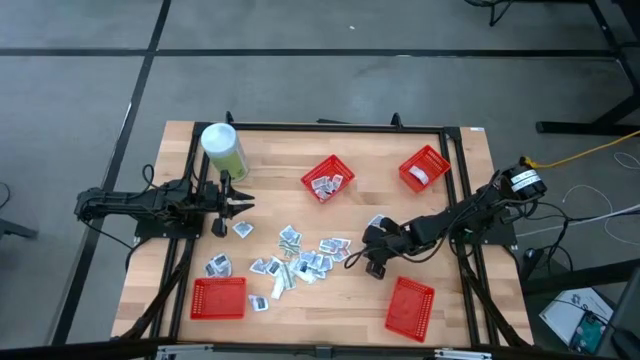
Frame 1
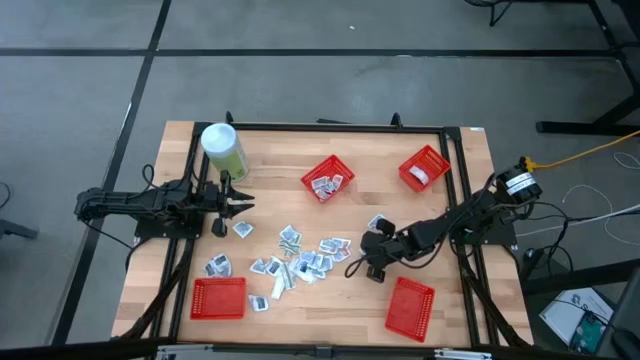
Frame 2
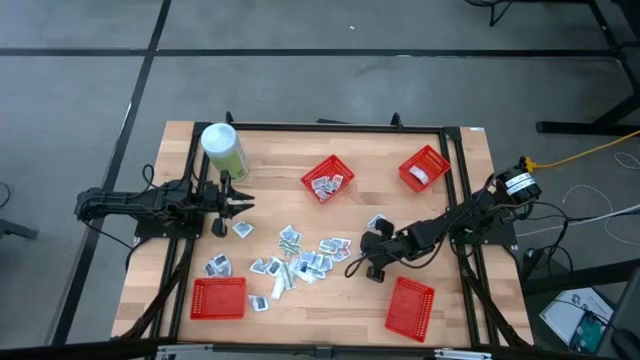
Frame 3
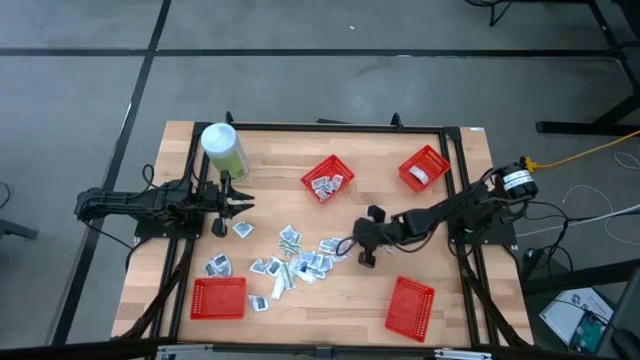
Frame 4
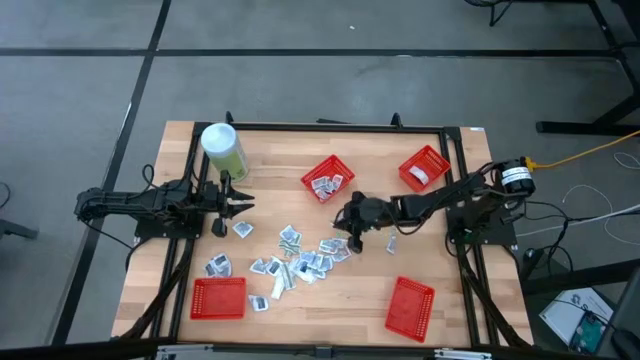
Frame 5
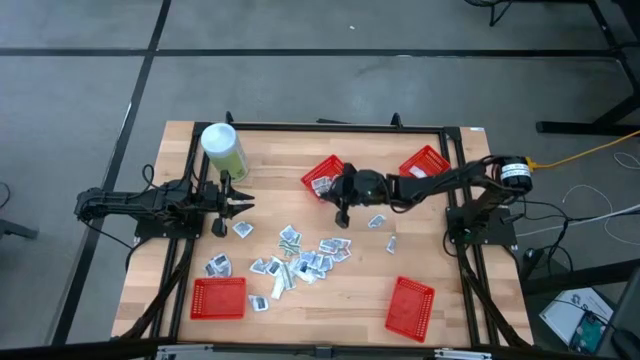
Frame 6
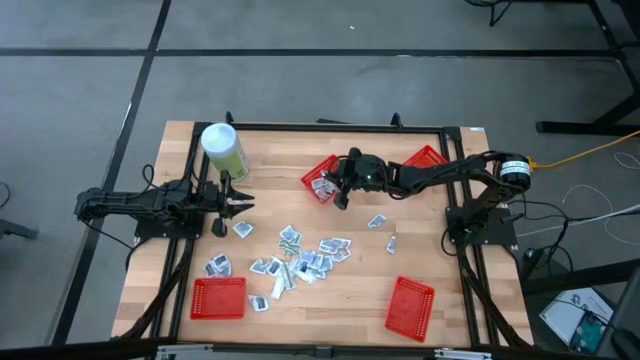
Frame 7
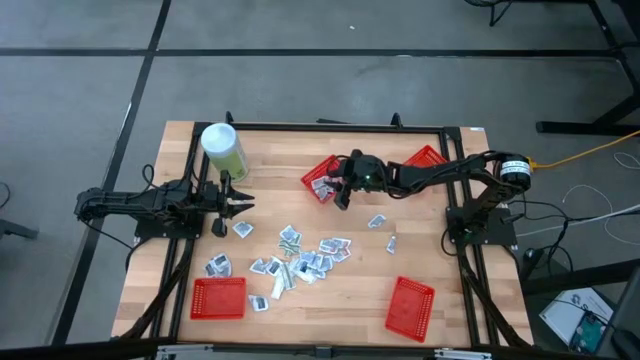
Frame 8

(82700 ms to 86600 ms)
Task: Pick & Place First Aid Supplies
Put the orange ointment pack into the red container

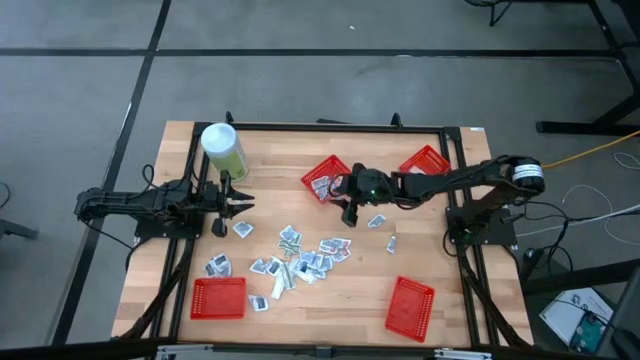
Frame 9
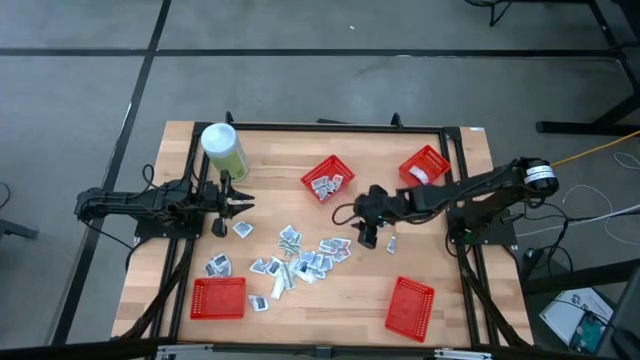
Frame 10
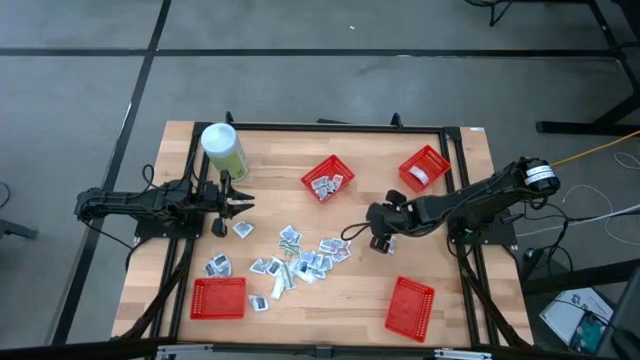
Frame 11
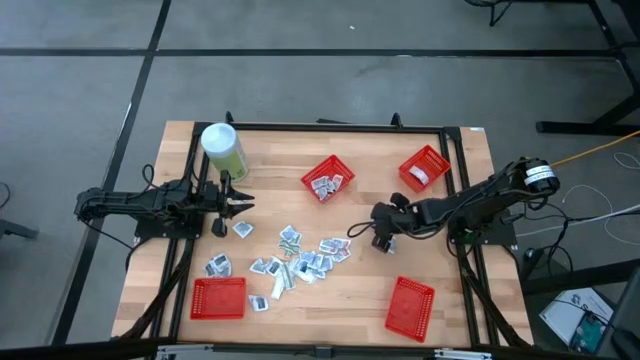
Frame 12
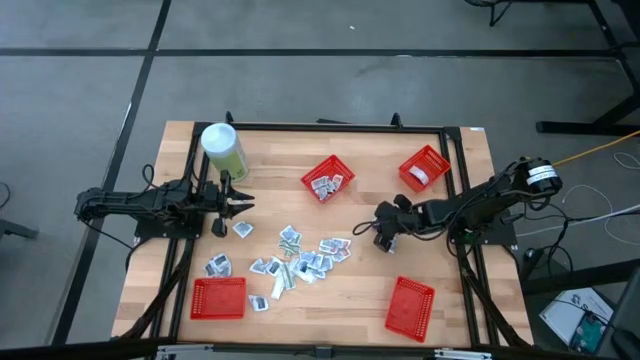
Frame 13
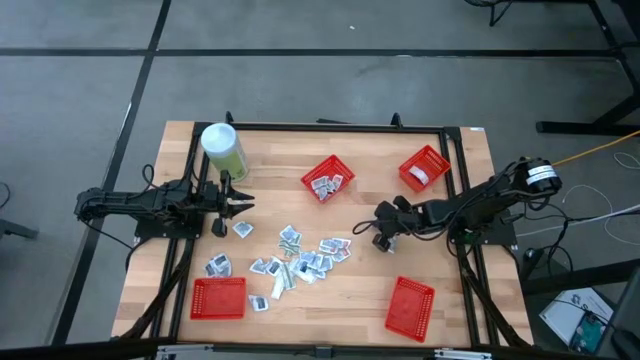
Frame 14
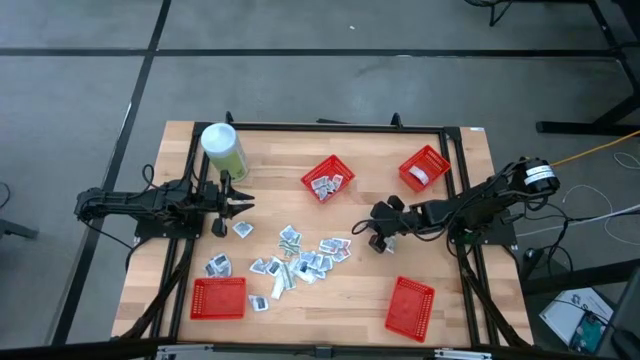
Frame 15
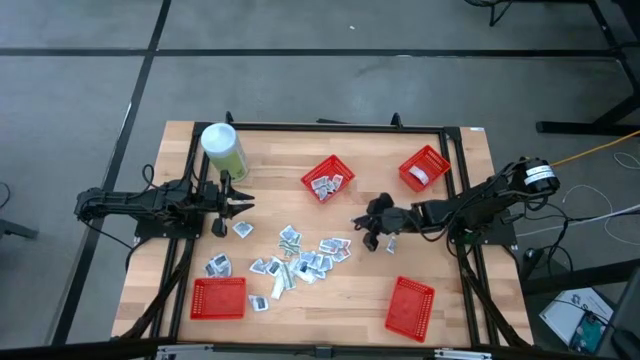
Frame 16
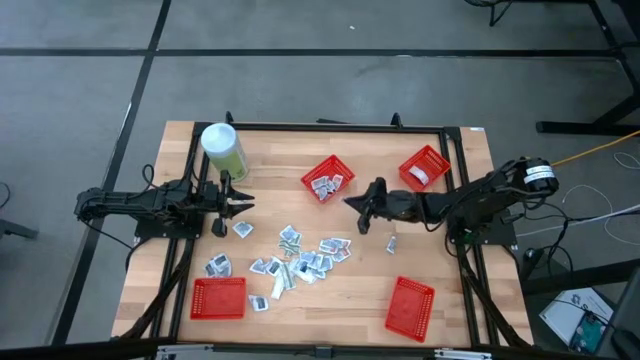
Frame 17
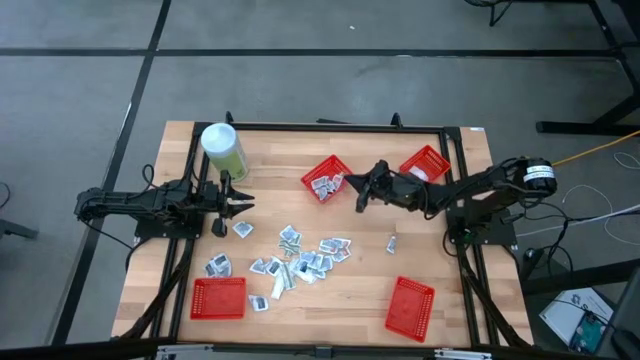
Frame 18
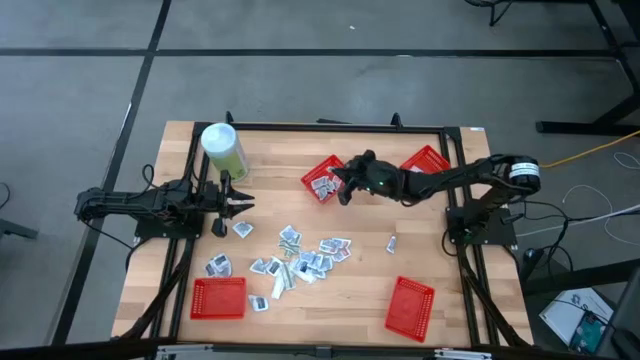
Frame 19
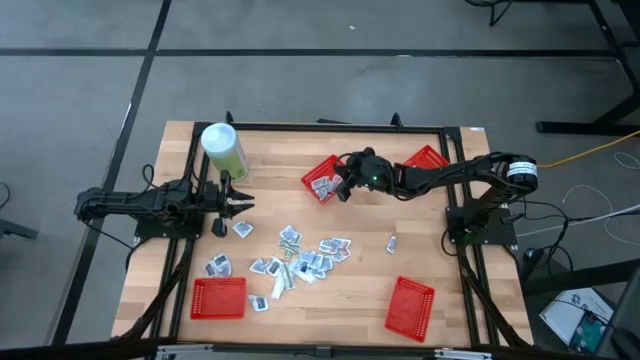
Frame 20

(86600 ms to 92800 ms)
Put the orange ointment pack into the red container

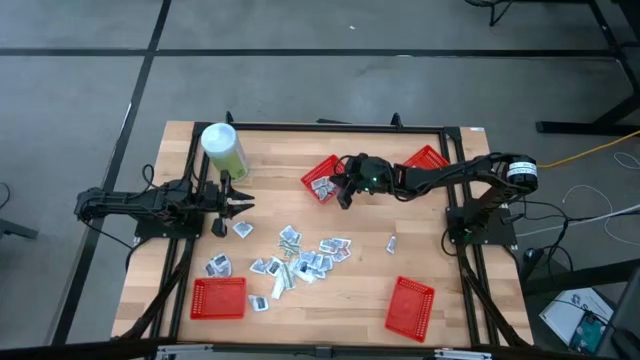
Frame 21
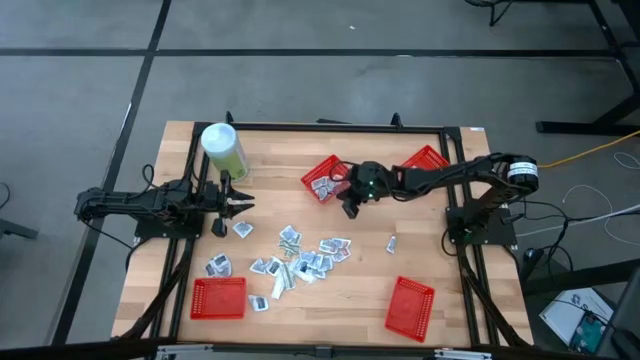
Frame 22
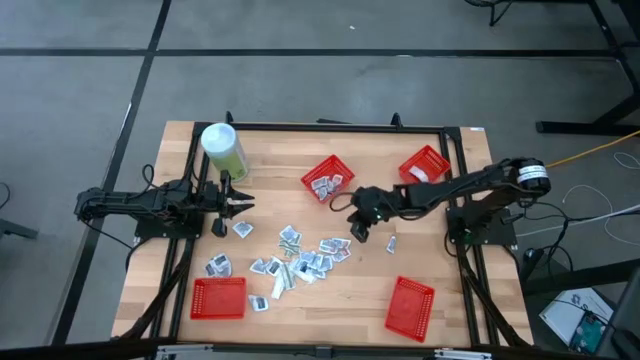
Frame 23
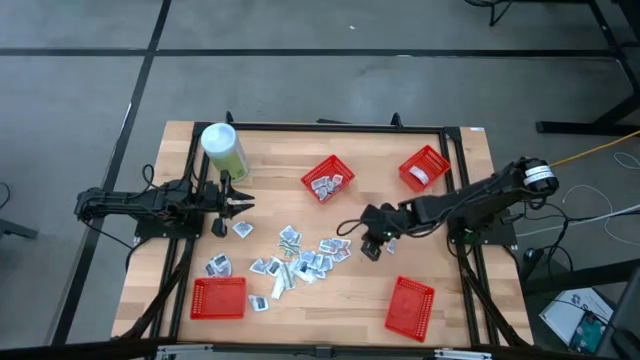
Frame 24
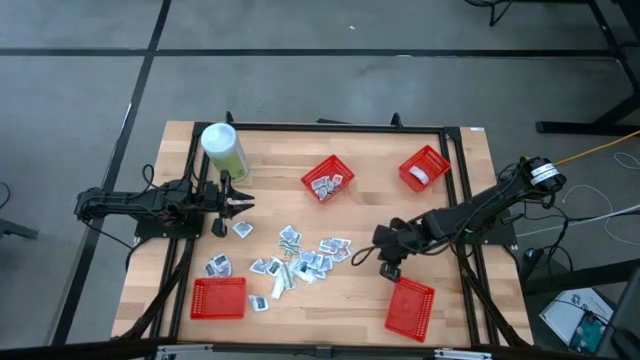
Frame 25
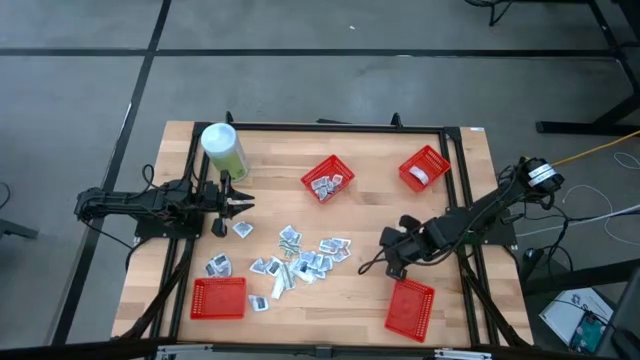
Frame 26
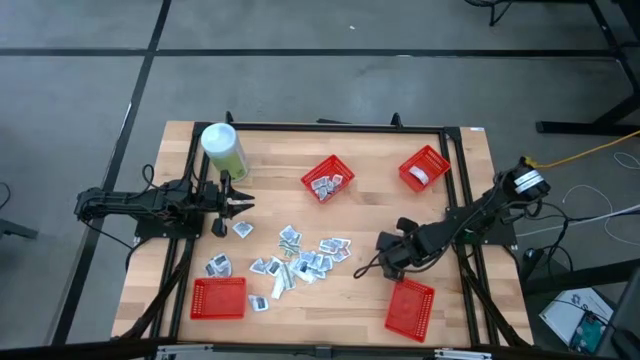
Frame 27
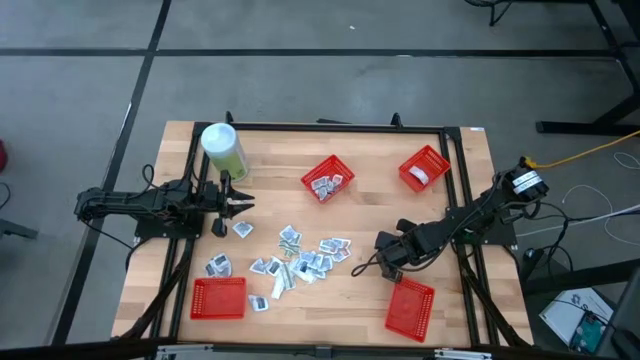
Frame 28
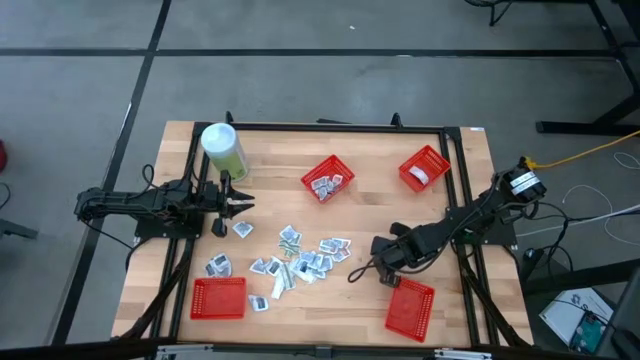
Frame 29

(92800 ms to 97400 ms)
Put the orange ointment pack into the red container

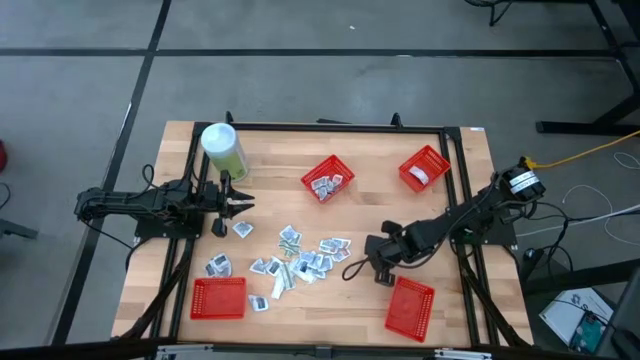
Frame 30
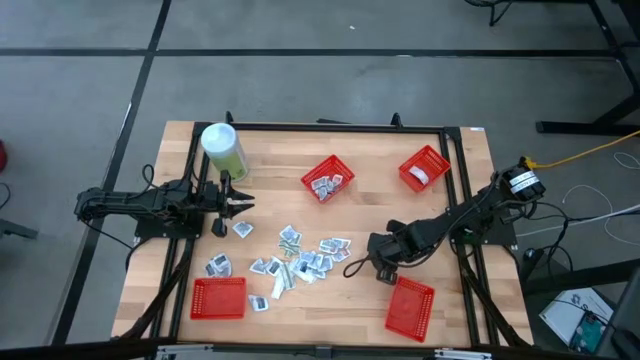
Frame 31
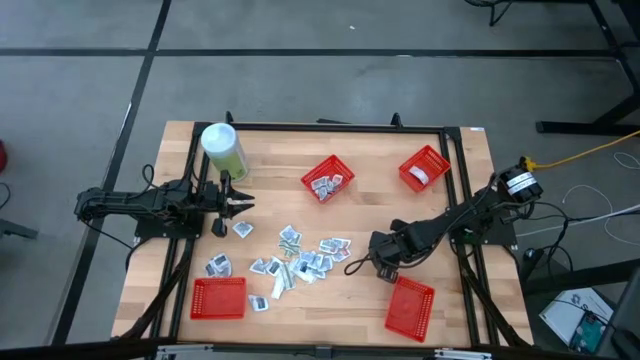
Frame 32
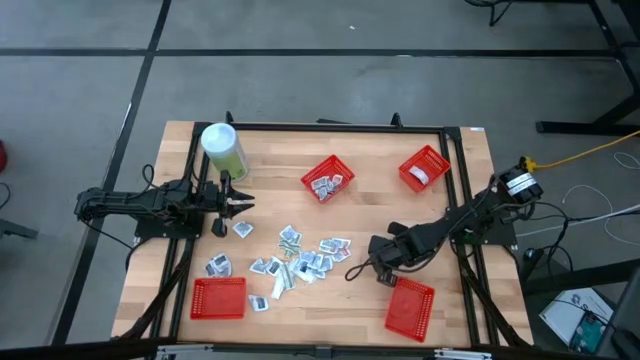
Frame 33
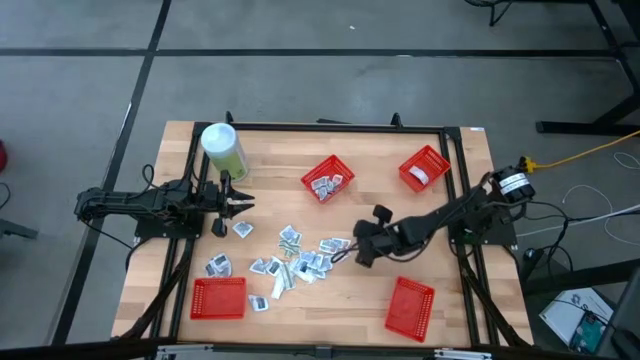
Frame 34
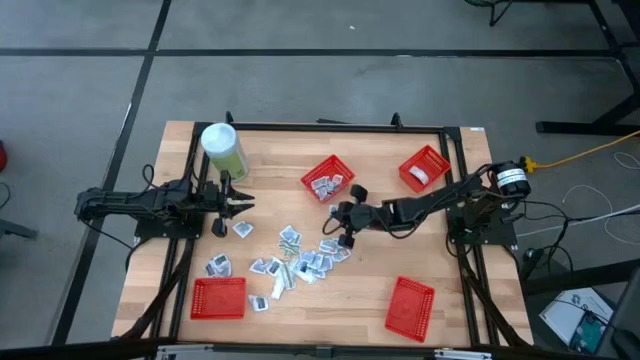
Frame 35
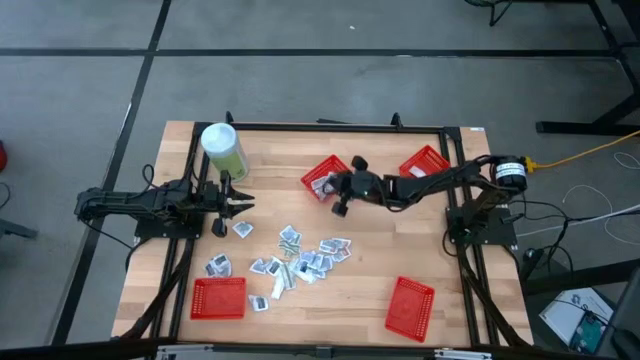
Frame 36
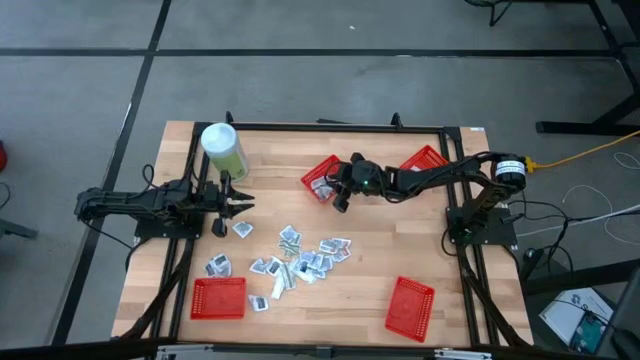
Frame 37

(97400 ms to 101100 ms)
Put the orange ointment pack into the red container

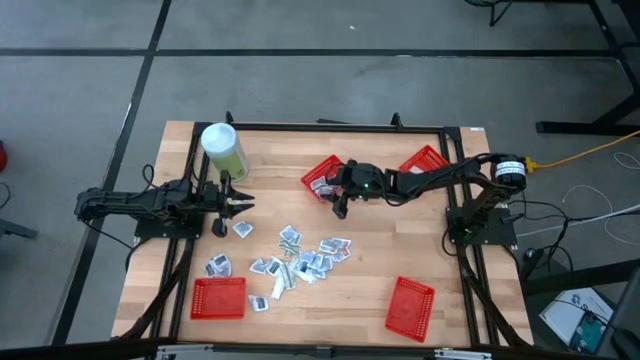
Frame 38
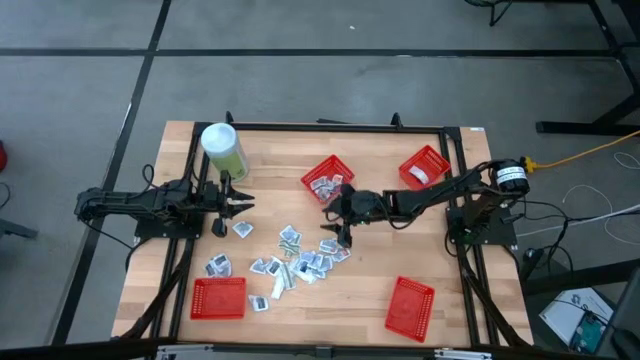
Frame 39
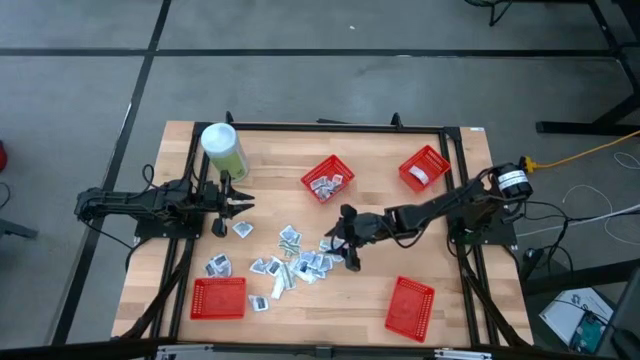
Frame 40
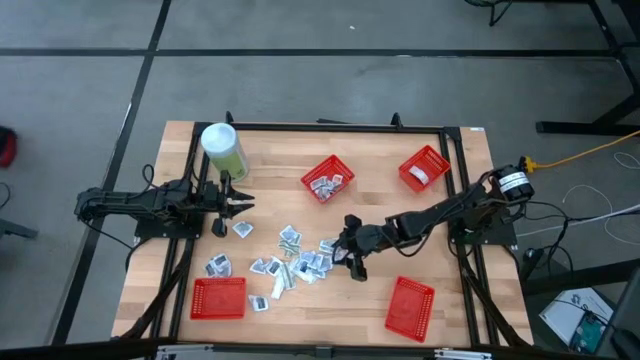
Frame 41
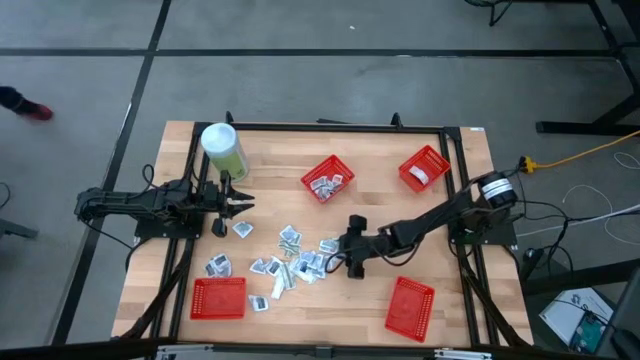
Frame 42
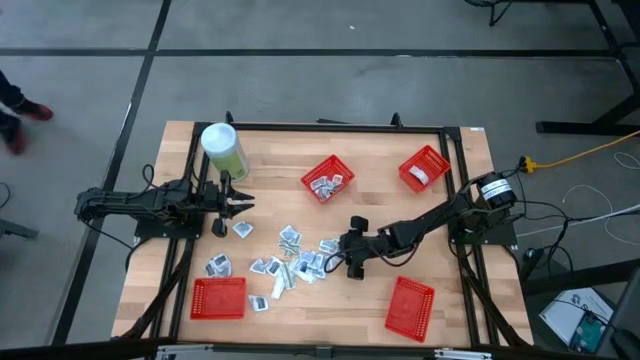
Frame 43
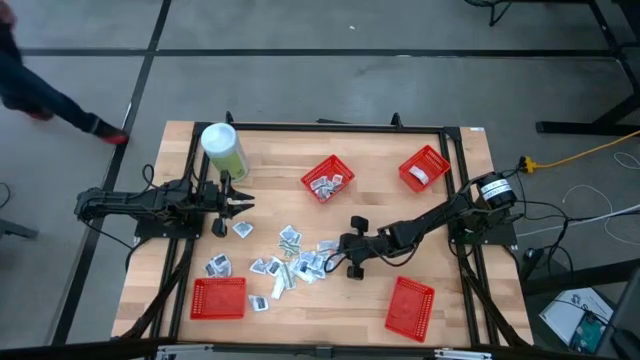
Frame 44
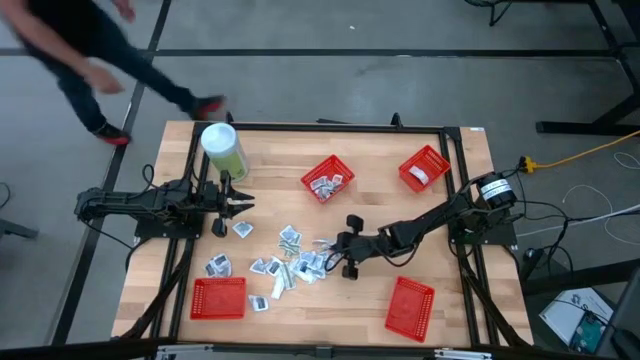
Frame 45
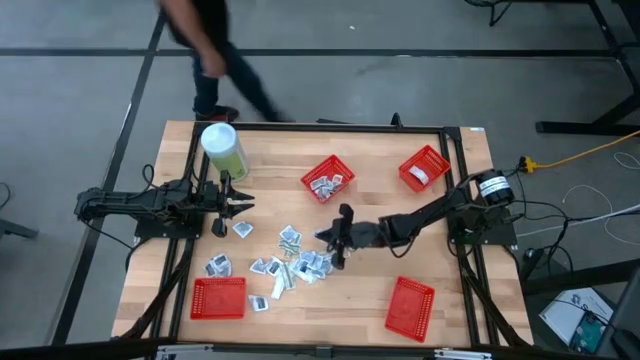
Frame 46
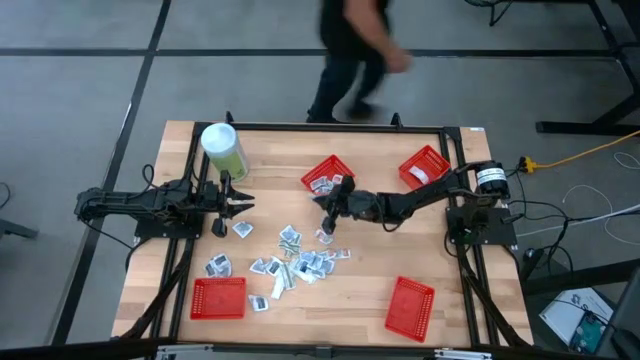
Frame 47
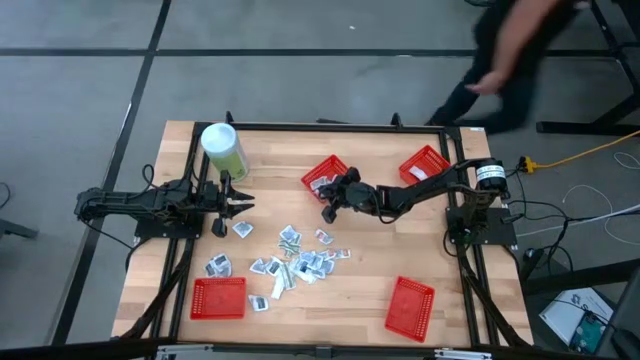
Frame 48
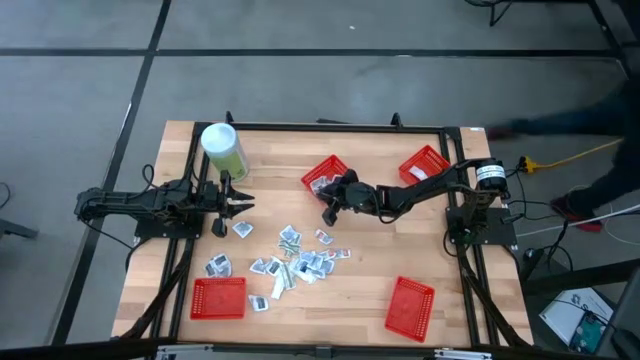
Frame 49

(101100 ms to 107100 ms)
Put the orange ointment pack into the red container
